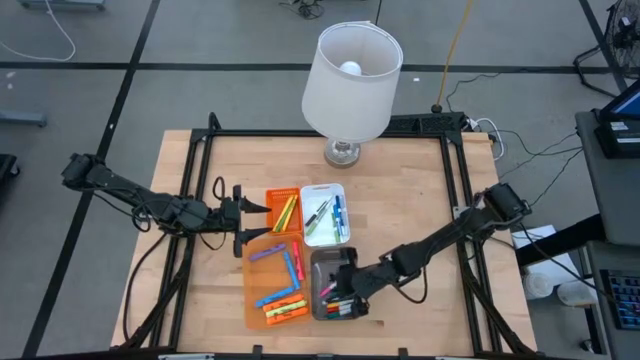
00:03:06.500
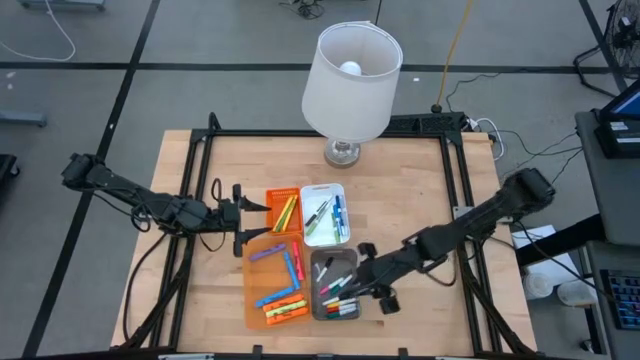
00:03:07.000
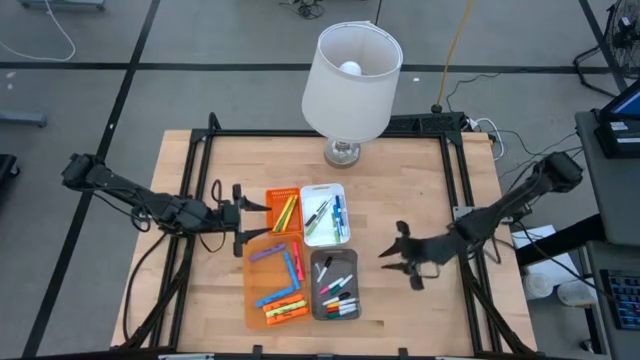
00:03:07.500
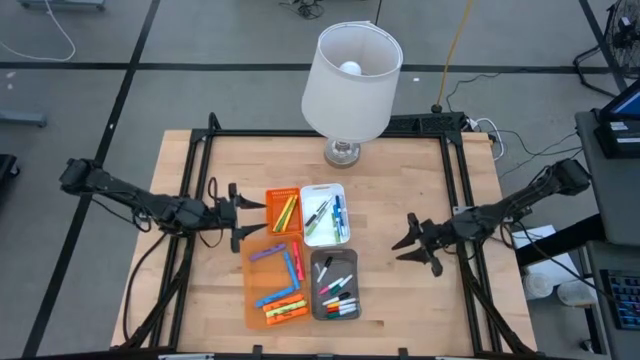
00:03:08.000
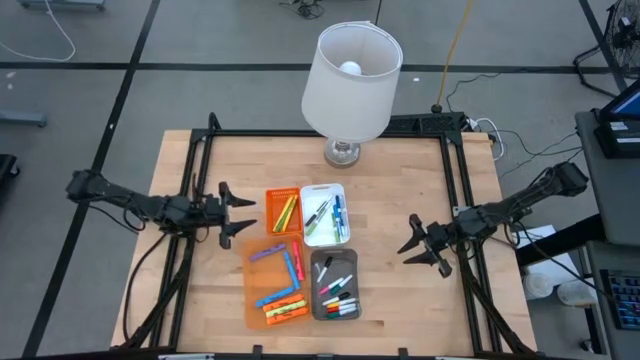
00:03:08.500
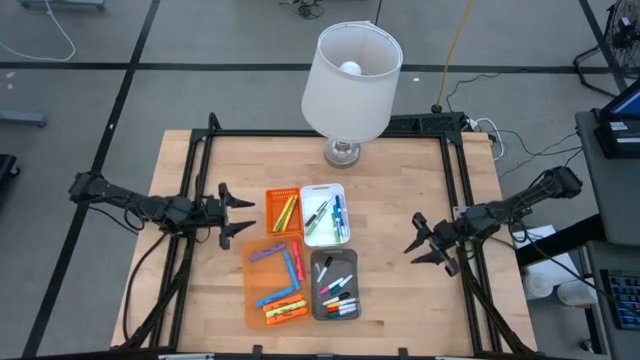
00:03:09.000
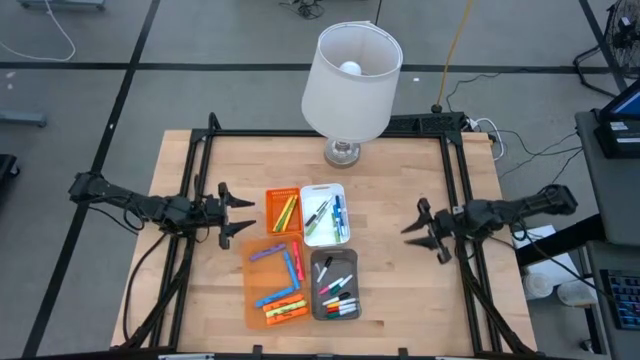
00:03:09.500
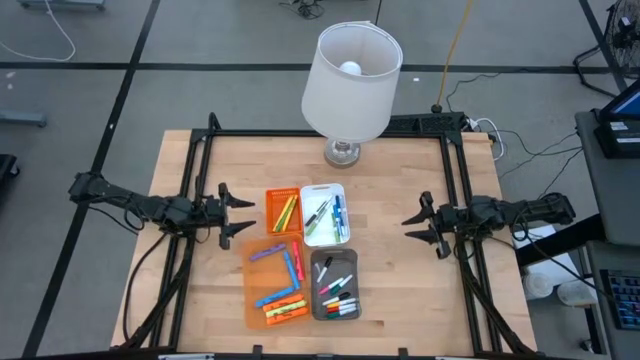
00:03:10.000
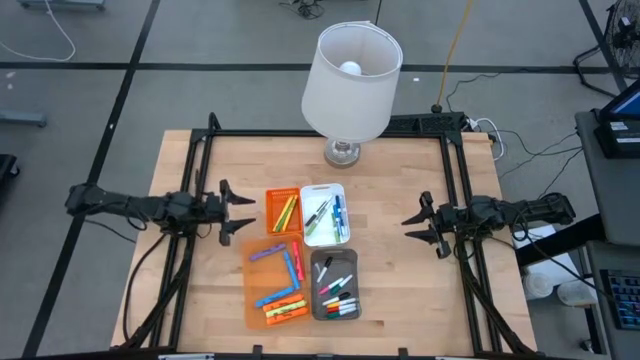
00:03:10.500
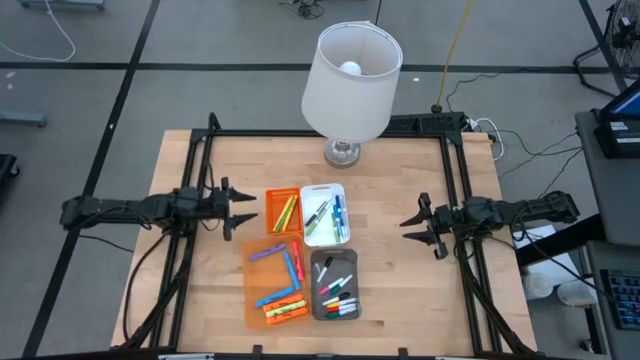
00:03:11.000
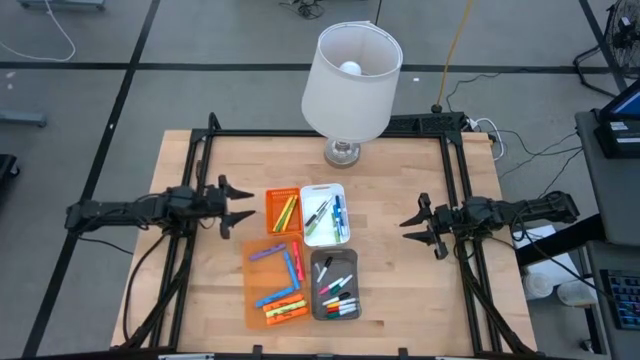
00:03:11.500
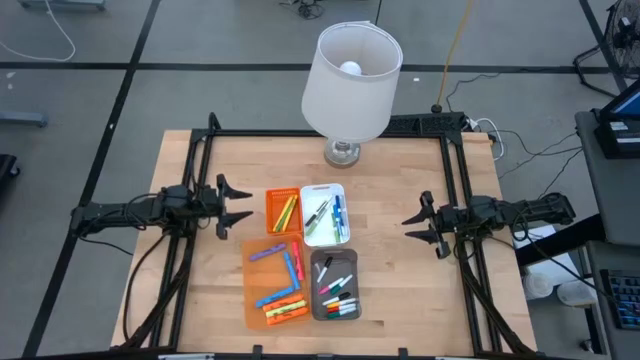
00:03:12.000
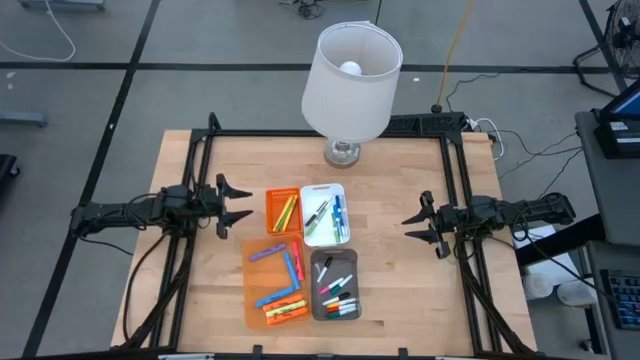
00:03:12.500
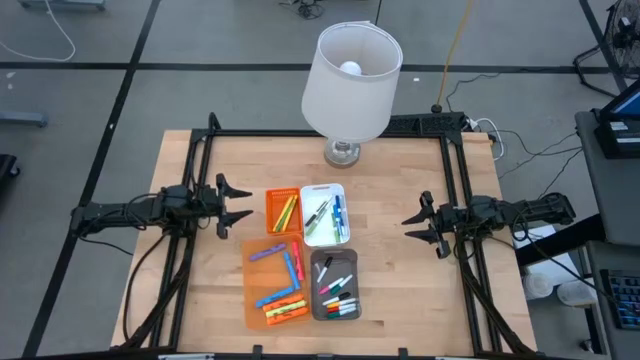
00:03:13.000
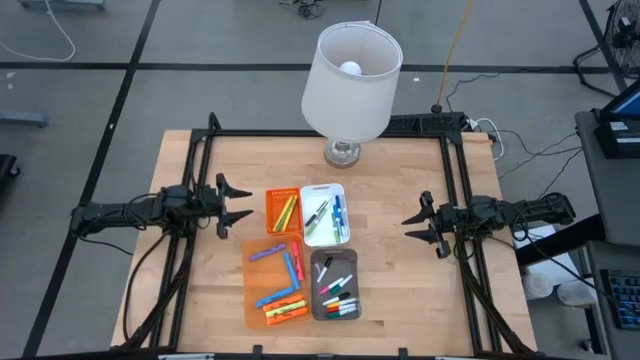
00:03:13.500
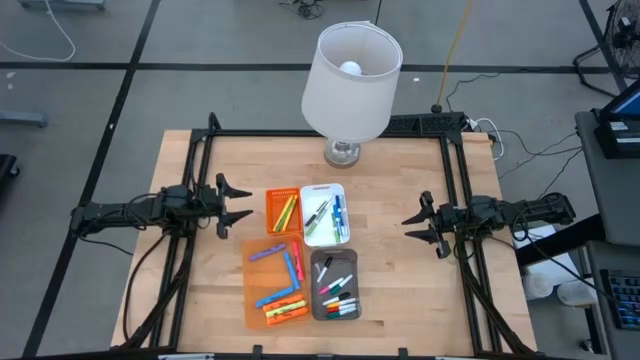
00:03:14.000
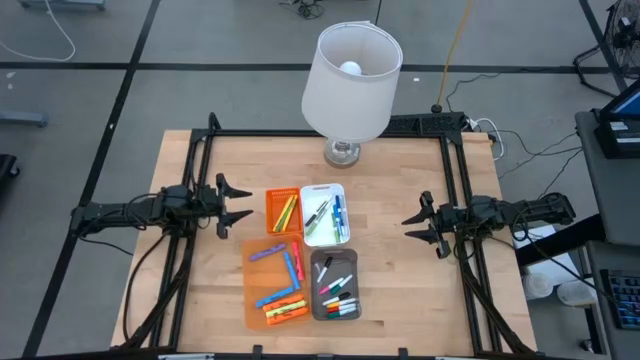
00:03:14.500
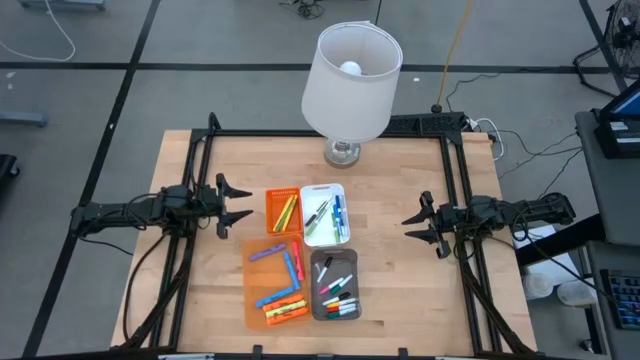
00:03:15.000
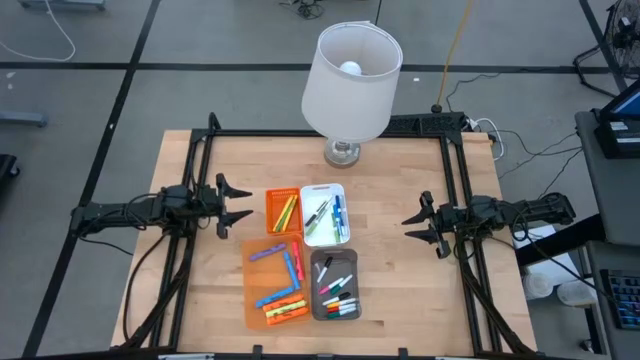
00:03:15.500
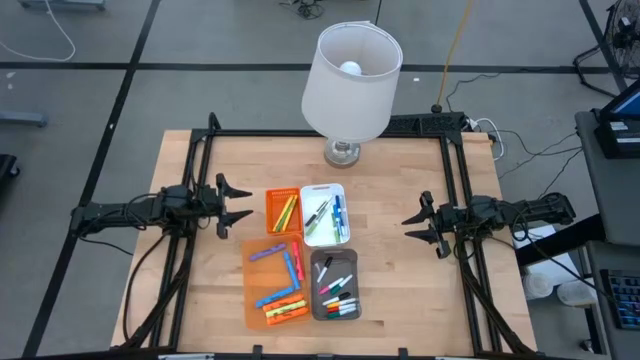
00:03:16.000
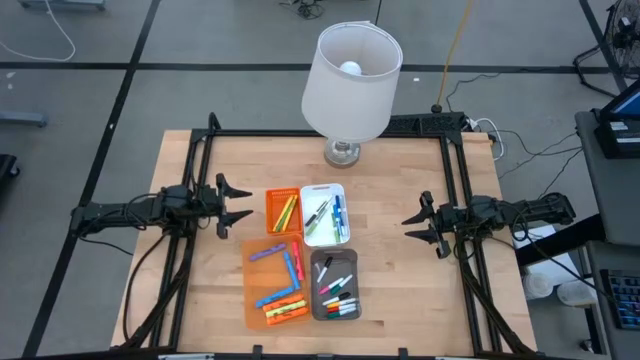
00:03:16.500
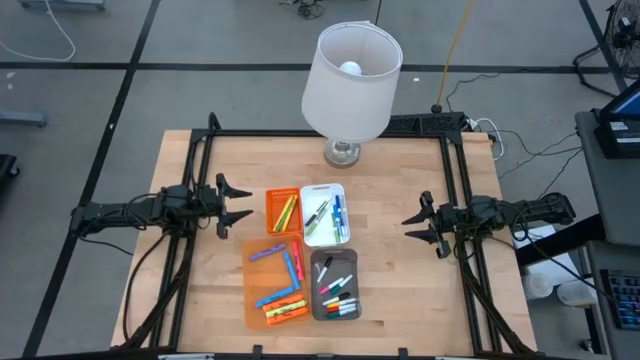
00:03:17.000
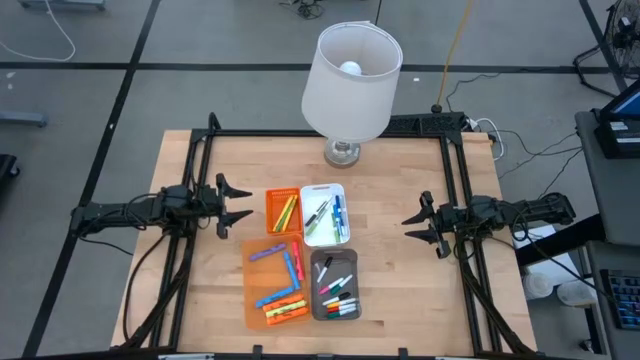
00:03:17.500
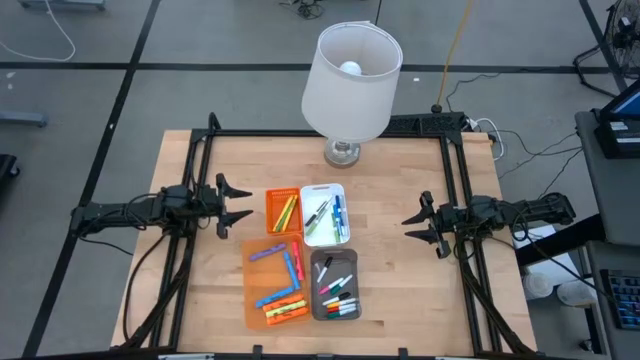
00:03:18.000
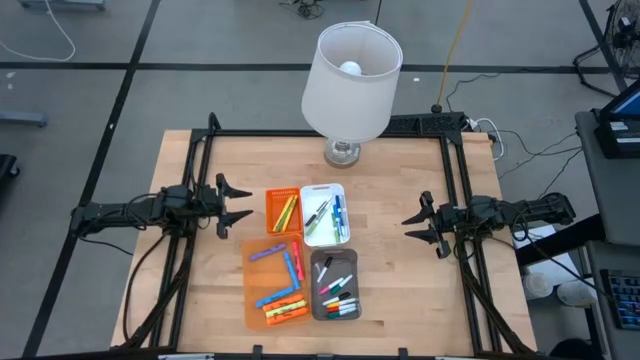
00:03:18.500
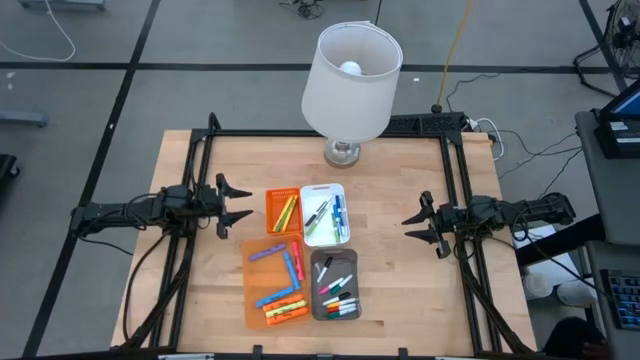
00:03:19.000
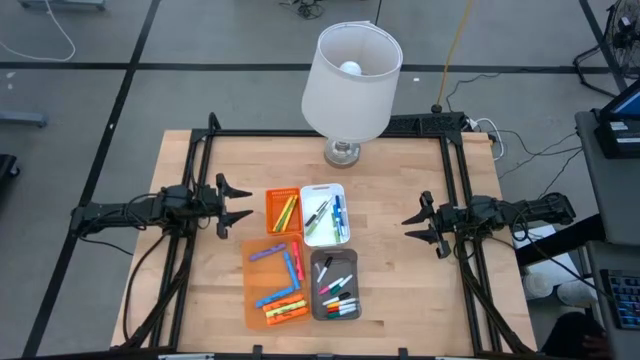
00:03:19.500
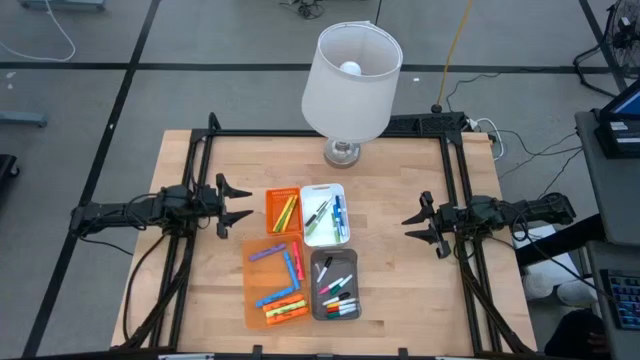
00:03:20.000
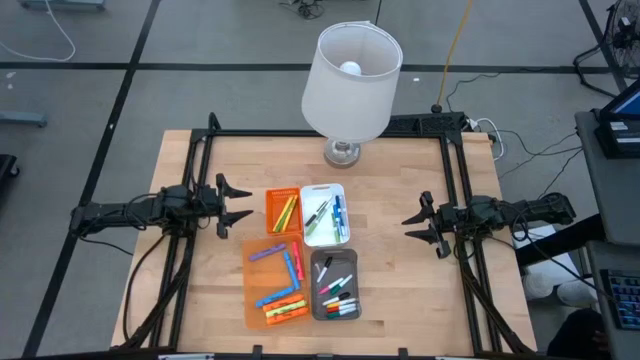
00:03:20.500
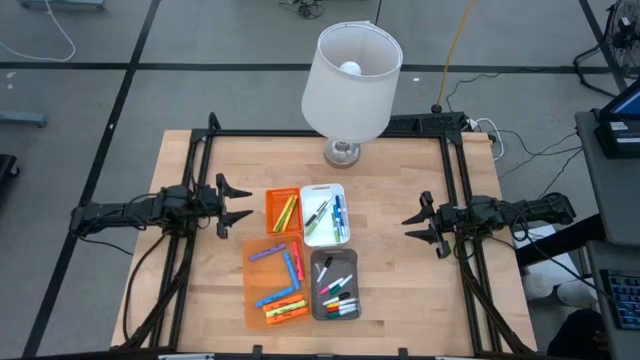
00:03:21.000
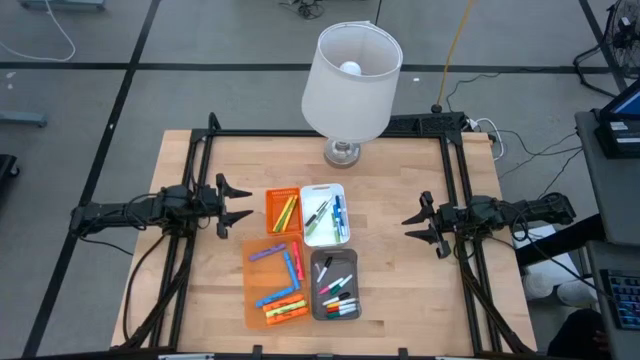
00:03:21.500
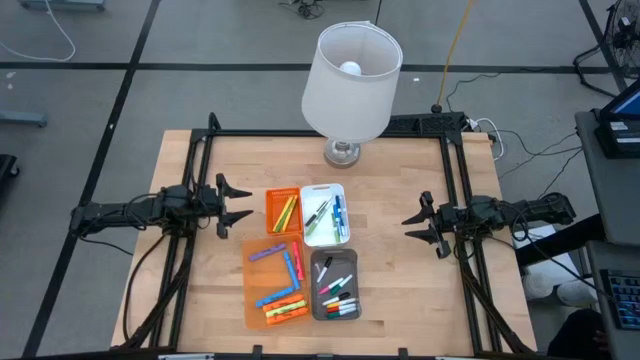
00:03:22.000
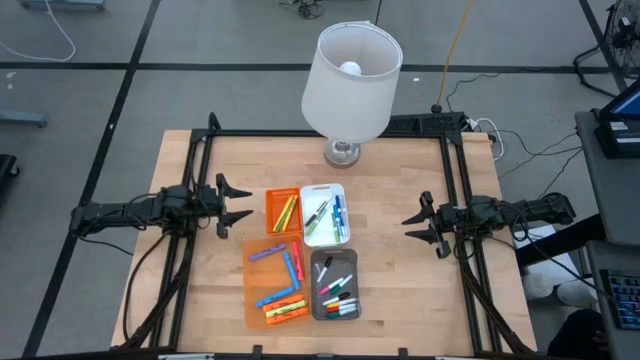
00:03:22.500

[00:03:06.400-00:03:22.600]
Task: Pick & Place Markers
Return to Home Position

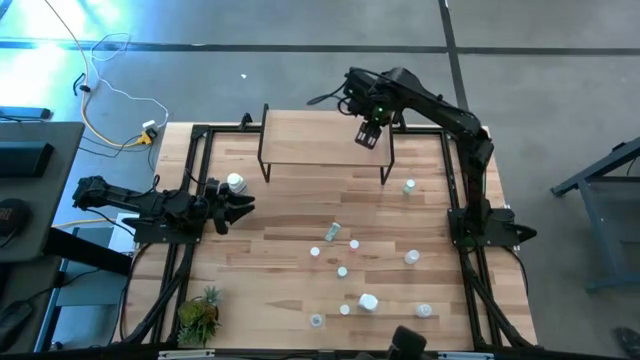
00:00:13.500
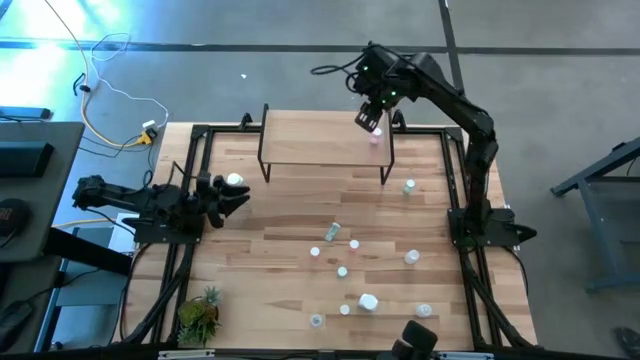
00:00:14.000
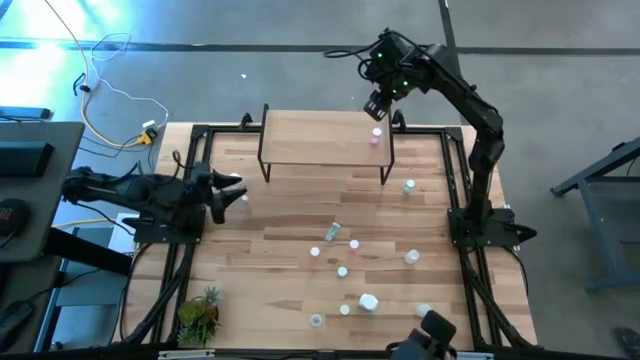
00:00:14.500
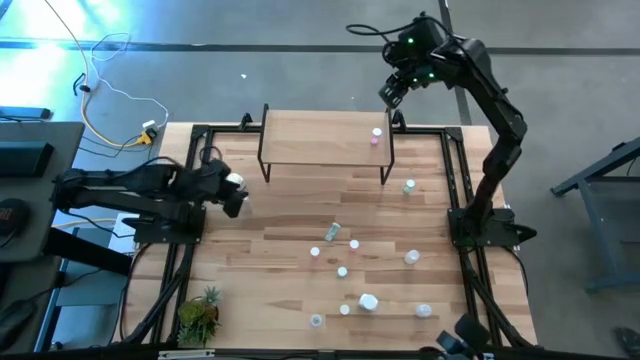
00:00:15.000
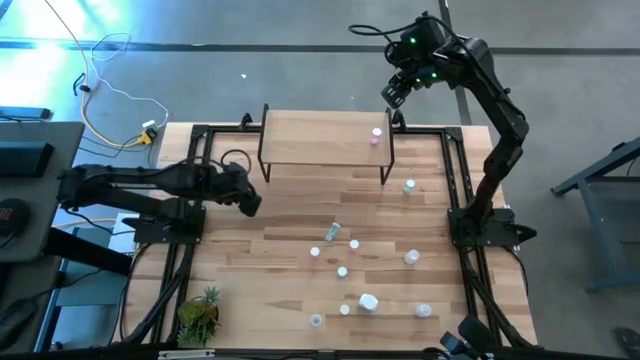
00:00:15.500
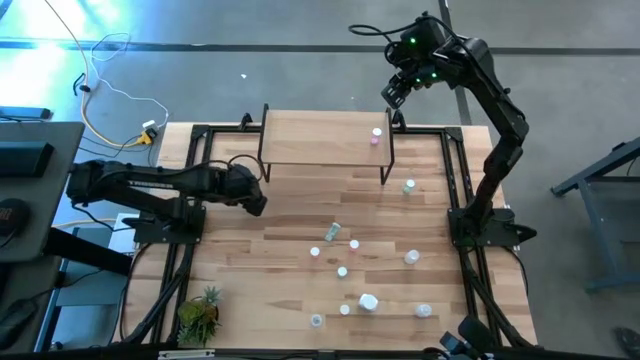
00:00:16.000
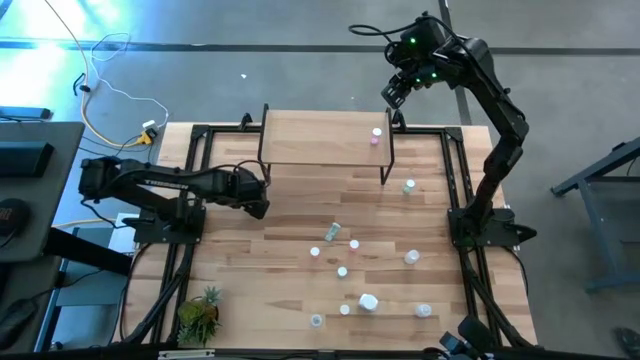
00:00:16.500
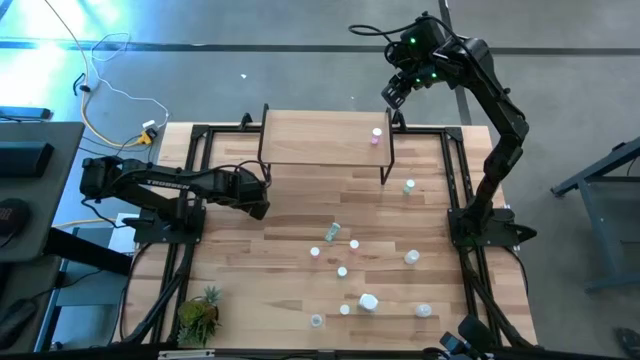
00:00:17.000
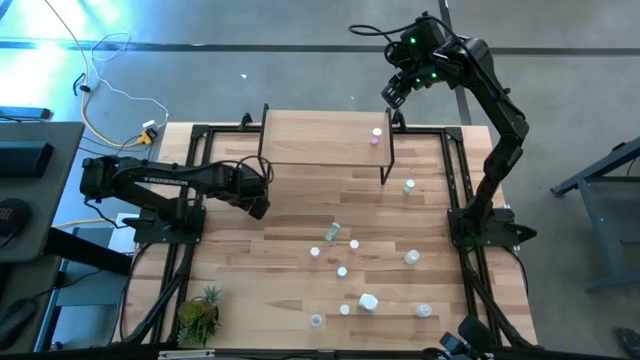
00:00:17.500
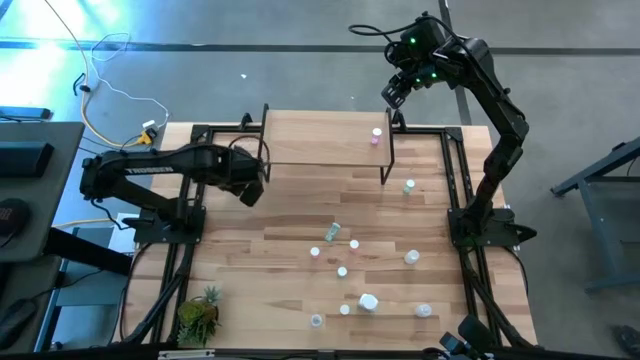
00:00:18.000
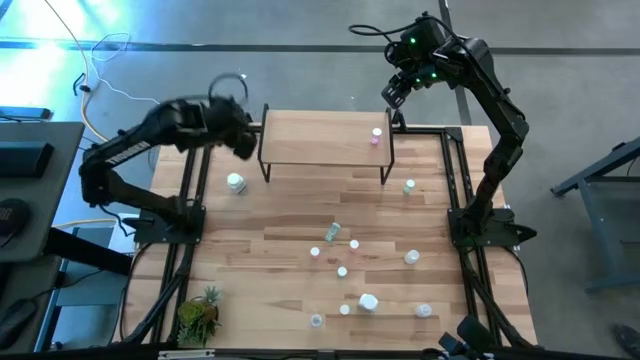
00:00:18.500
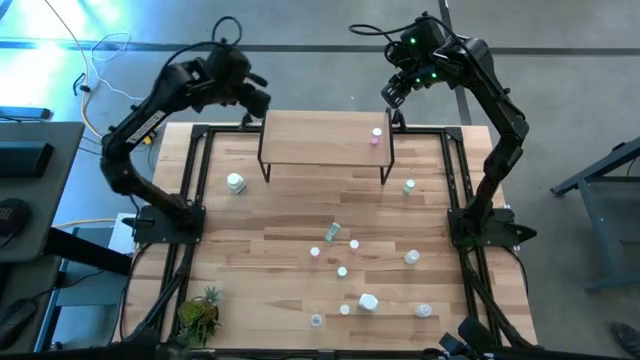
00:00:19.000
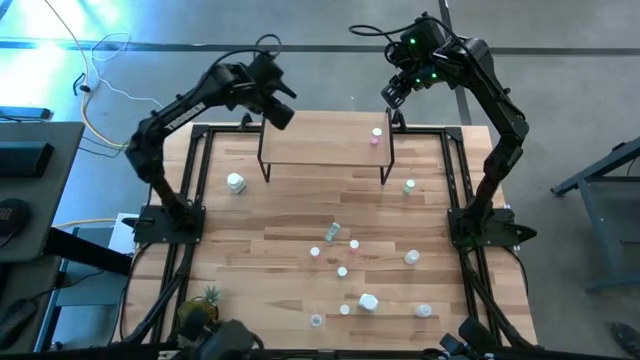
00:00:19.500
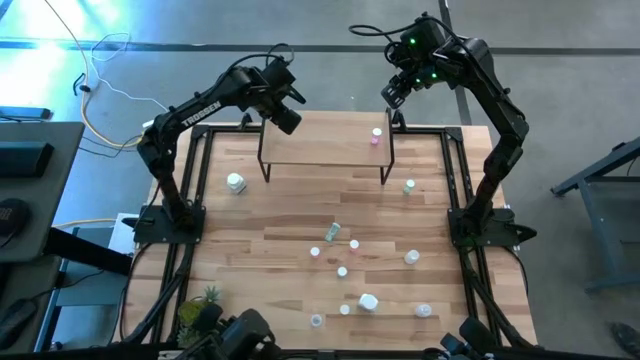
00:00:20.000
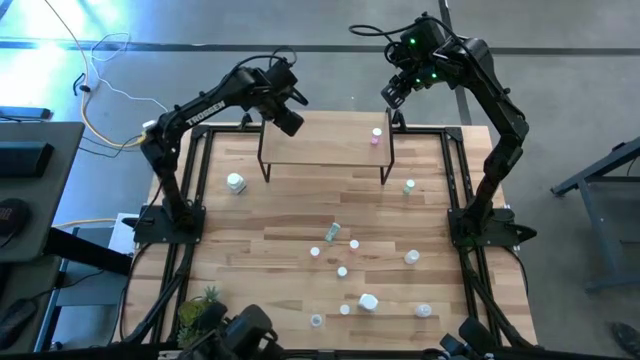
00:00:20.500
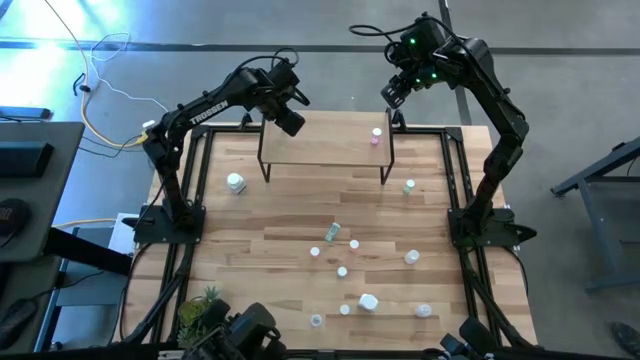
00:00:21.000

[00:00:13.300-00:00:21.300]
Task: Pick and place medicine bottles onto shelf by color
Put the top yellow pill bottle on the shelf
